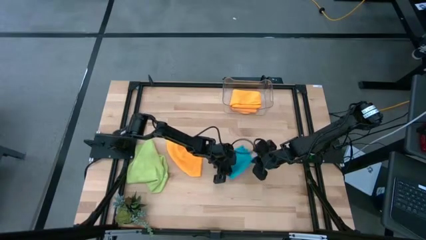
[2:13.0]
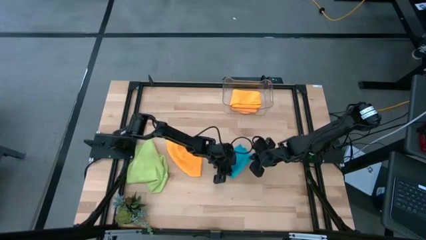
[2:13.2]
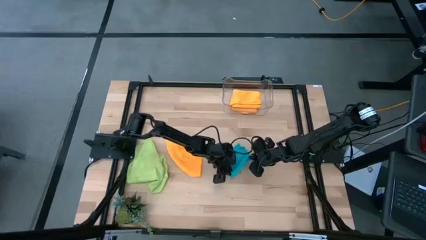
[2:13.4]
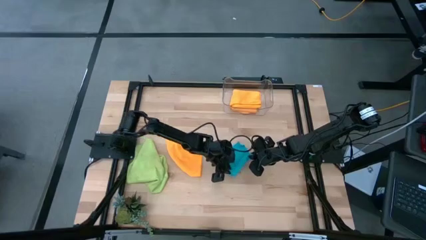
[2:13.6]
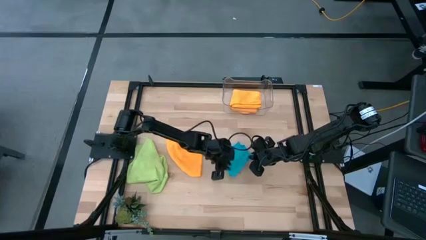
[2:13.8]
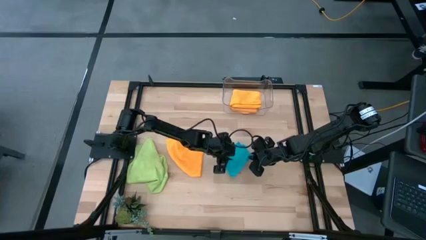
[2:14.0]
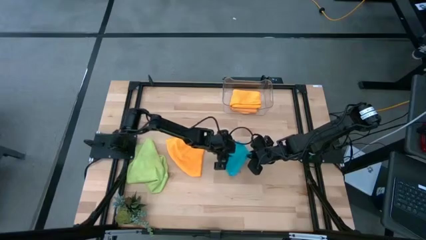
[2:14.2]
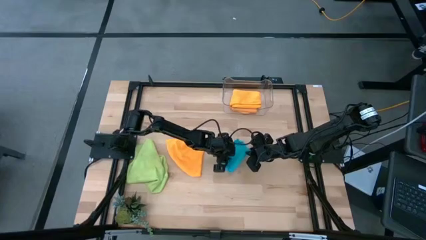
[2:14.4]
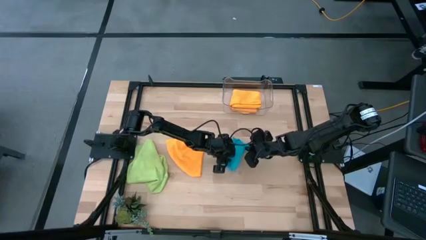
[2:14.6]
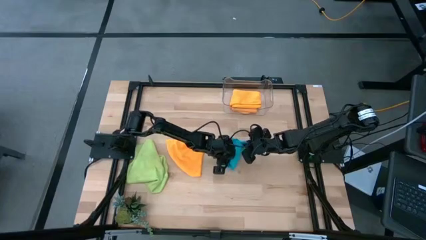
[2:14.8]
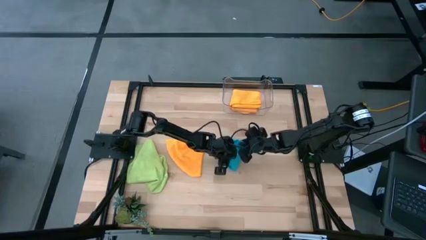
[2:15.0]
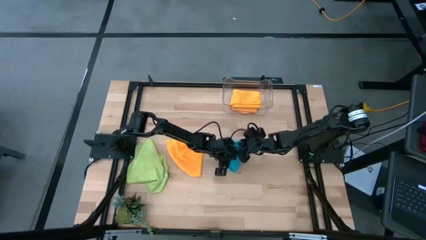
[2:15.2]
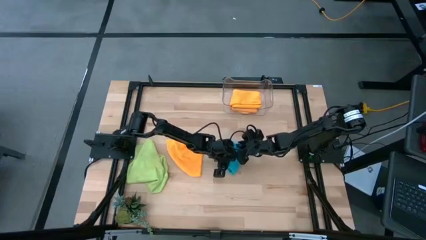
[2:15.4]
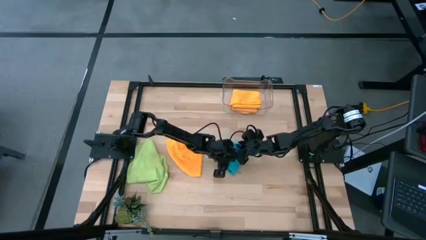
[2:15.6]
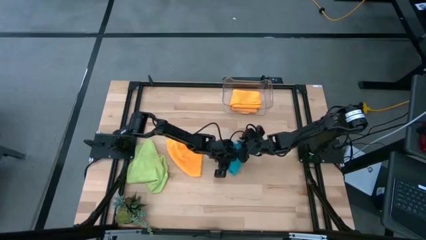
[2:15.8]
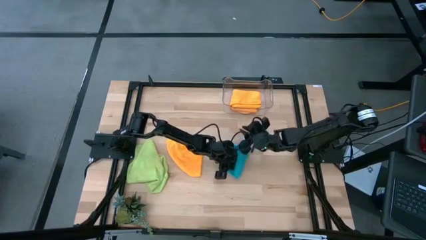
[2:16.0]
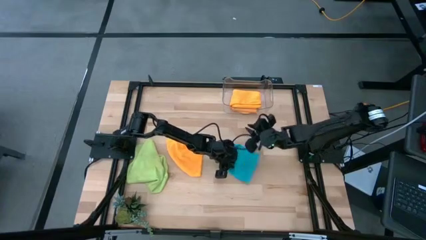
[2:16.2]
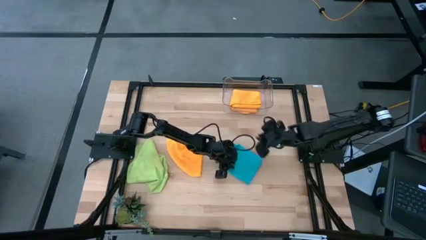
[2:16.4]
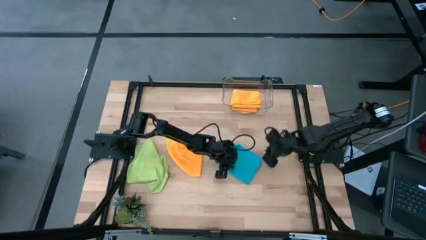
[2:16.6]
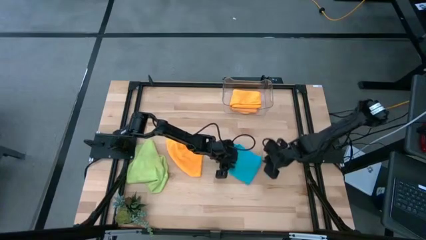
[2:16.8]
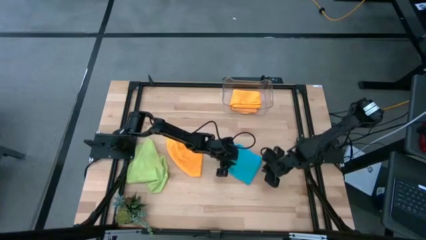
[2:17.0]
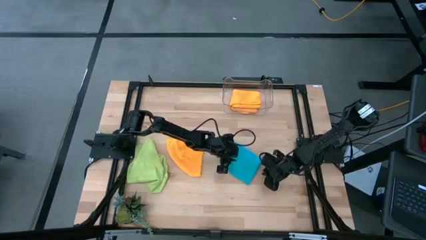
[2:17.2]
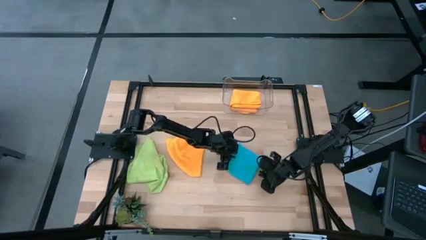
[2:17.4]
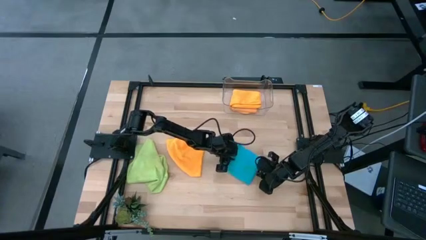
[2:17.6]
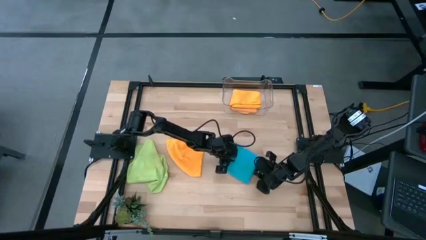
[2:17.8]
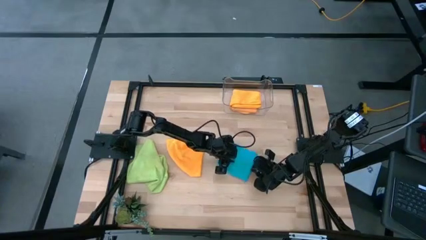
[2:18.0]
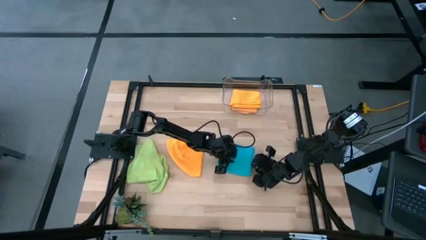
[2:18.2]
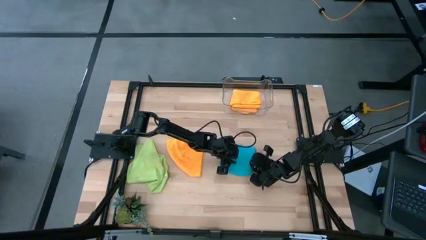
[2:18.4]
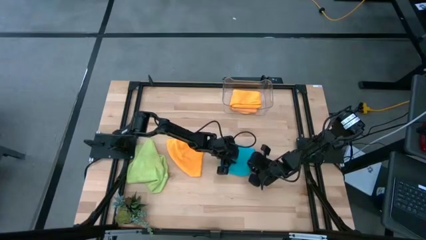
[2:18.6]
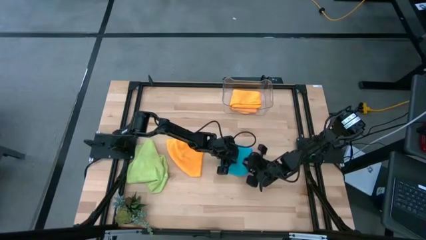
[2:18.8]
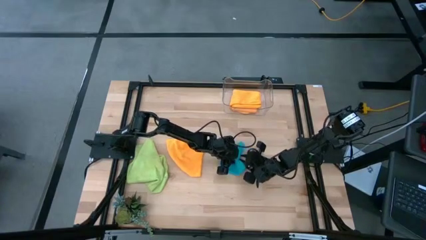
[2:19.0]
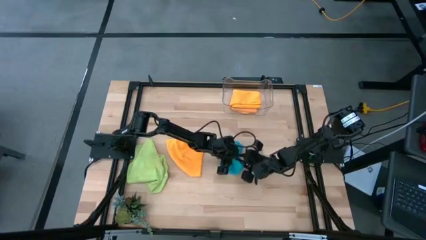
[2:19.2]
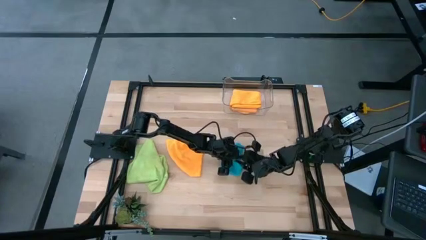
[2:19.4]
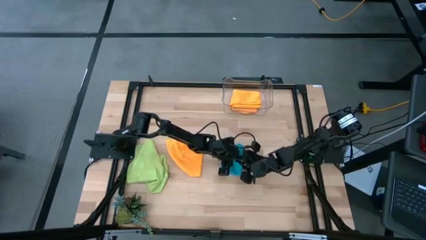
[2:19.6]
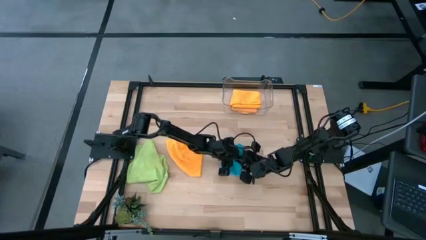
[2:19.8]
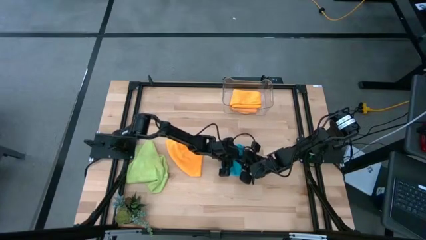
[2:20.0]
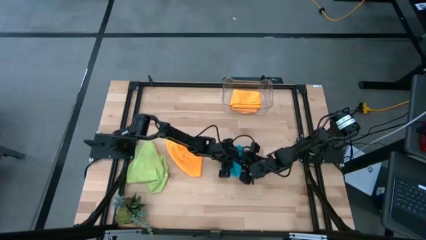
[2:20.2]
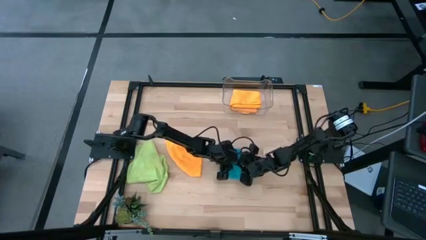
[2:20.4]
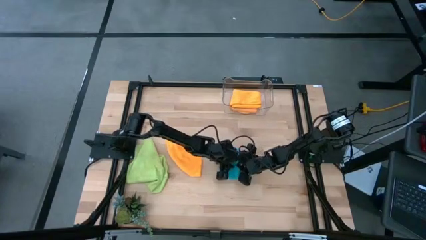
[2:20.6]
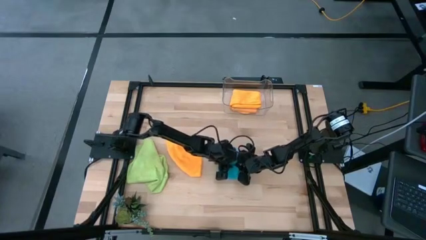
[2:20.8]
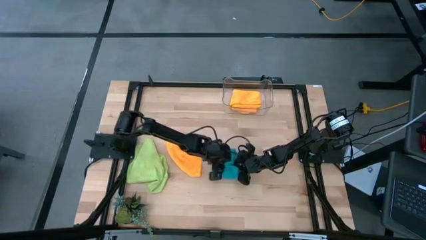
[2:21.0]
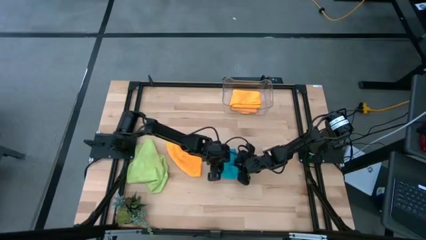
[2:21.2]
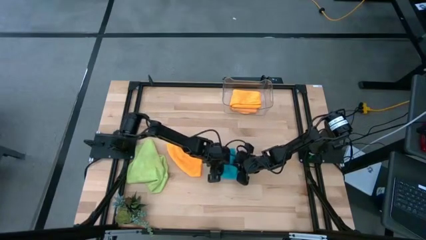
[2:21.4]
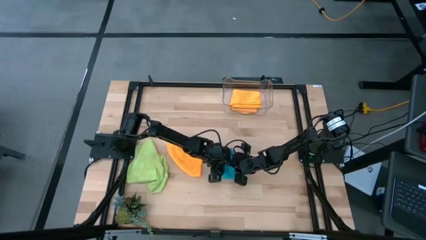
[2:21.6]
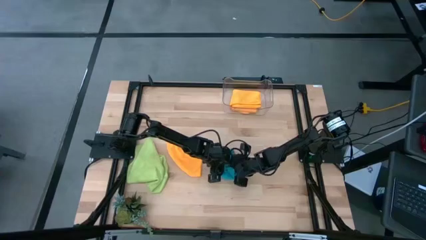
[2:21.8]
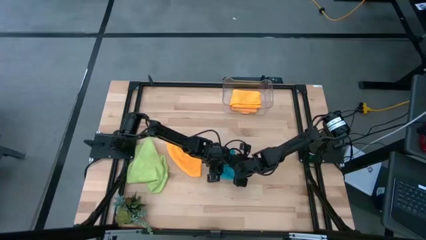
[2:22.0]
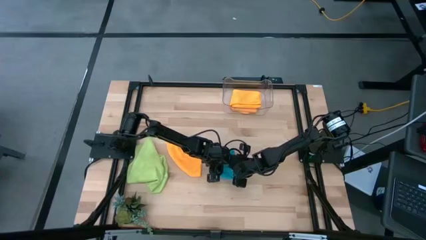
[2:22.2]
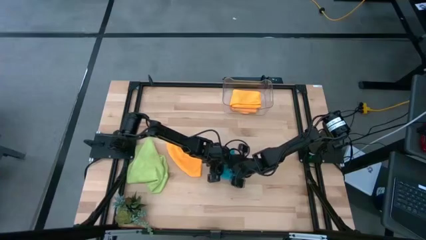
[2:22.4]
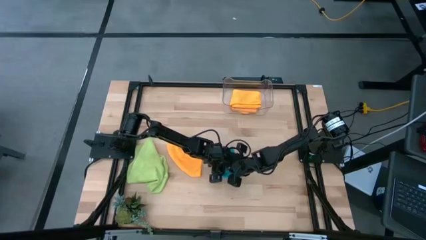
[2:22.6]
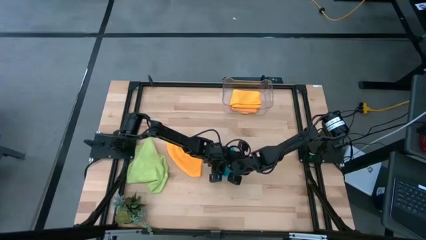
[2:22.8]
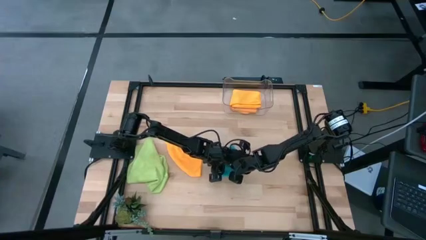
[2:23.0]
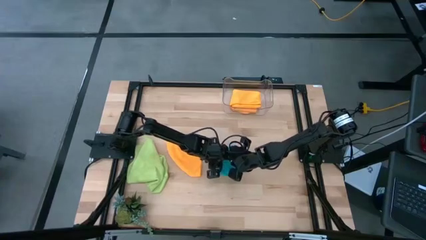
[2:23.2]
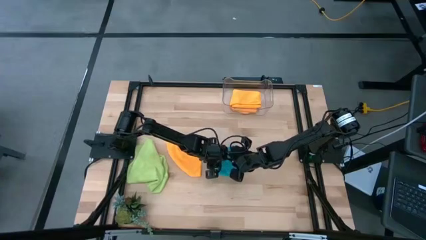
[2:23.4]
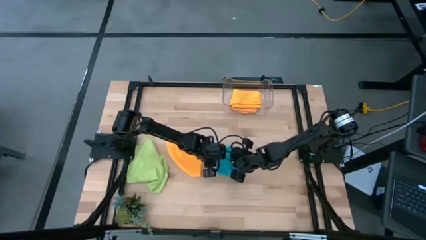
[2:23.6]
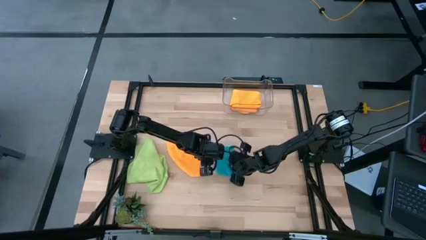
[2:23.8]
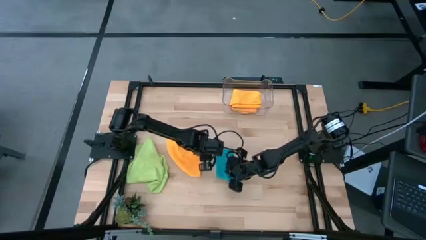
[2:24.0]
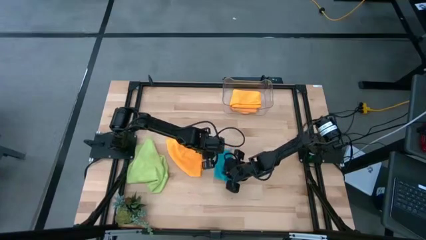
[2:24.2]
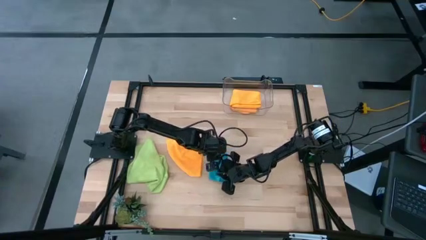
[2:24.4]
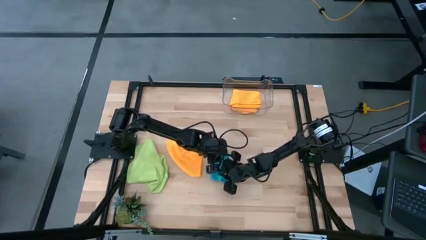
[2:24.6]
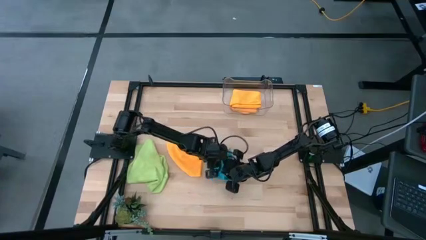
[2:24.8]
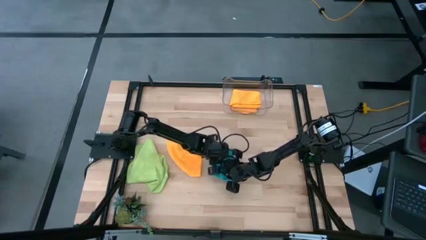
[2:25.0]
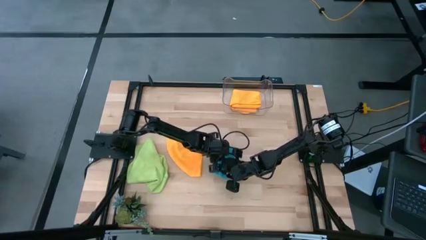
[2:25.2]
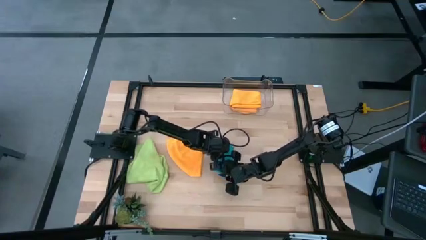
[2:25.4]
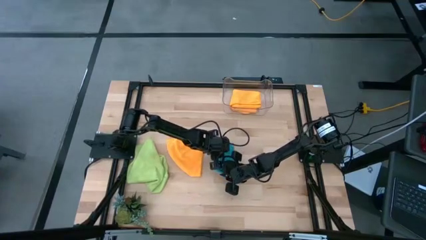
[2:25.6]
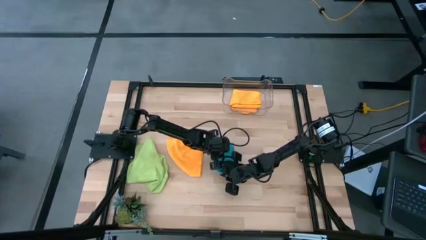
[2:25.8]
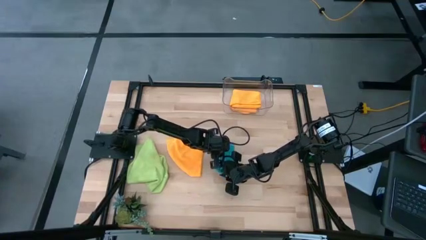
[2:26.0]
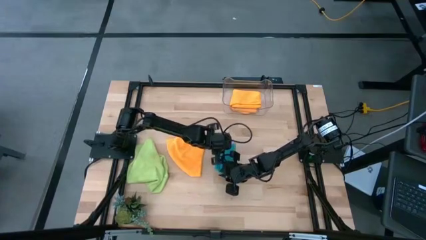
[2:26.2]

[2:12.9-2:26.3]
Task: Fold microfiber towels
Fold the blue microfiber towel

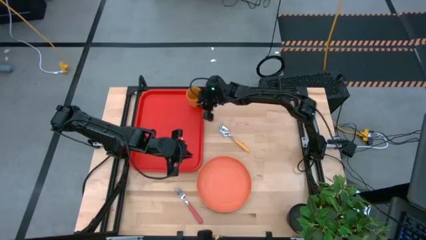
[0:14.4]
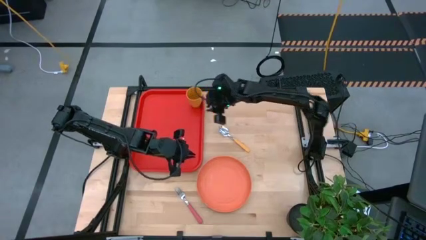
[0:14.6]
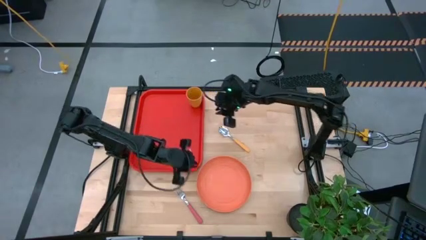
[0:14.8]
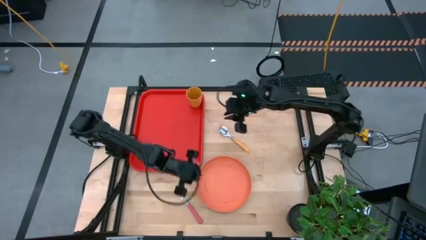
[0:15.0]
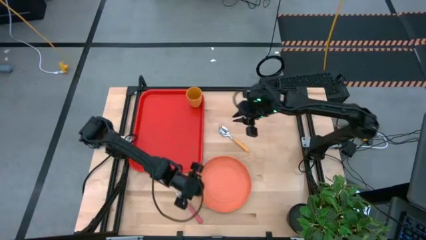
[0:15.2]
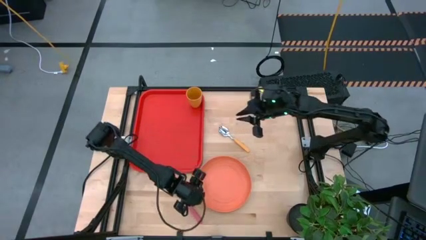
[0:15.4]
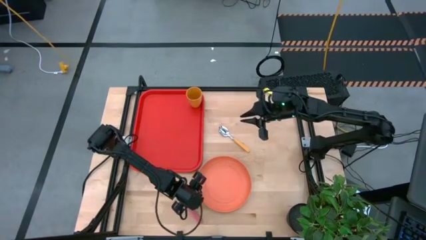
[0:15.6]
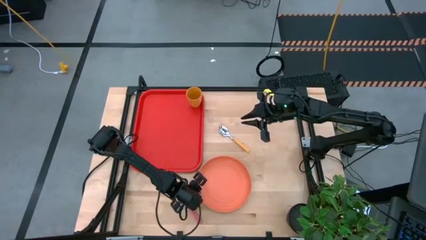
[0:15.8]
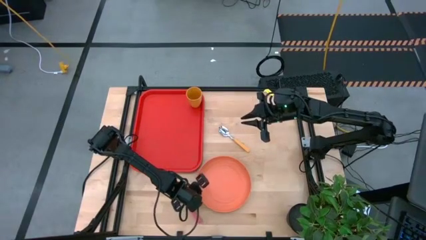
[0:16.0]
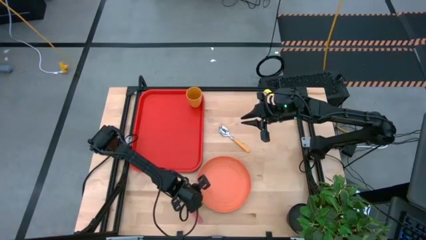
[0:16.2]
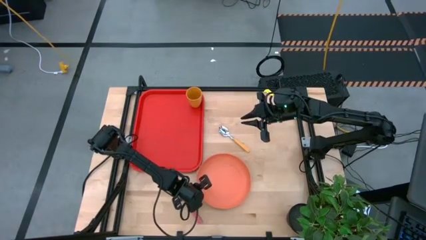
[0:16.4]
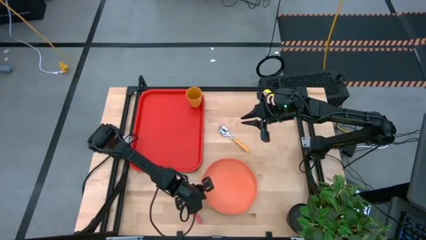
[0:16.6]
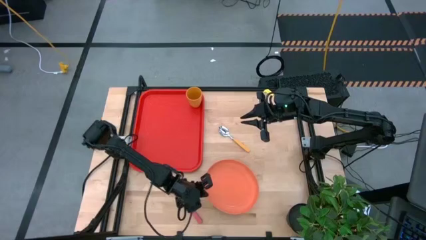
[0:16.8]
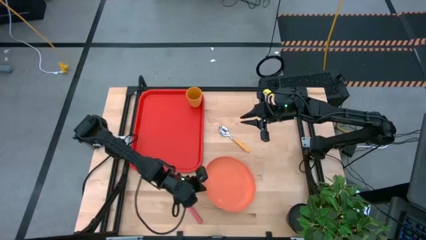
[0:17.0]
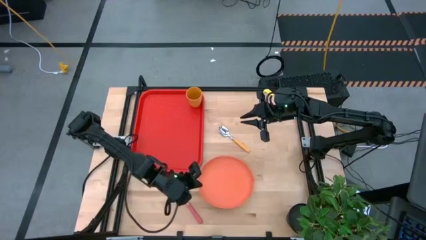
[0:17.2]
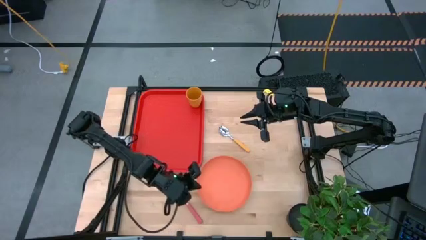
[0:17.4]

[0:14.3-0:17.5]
Task: Pick and place plate/cup/fork/spoon on tray
Put the orange plate on the red serving tray at the bottom left of the yellow cup
